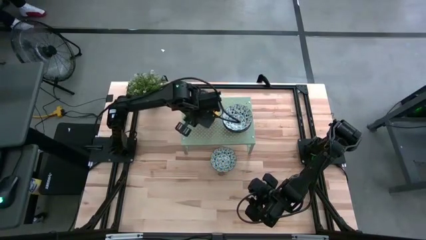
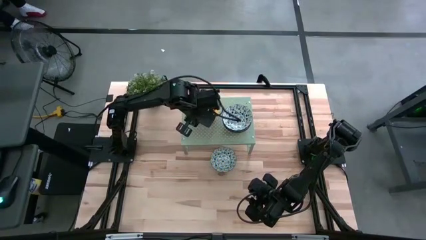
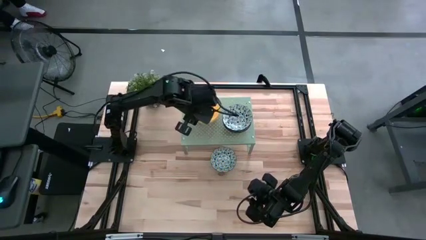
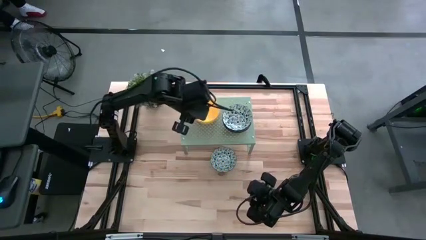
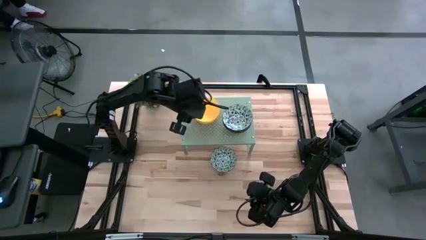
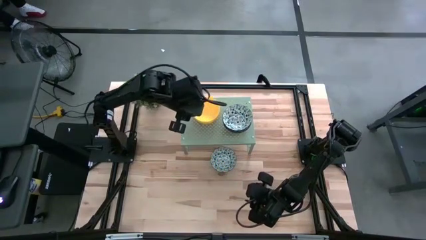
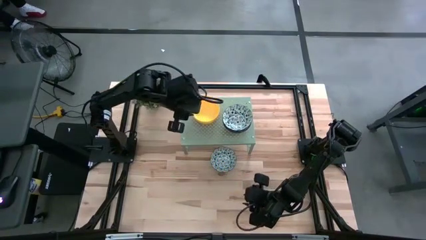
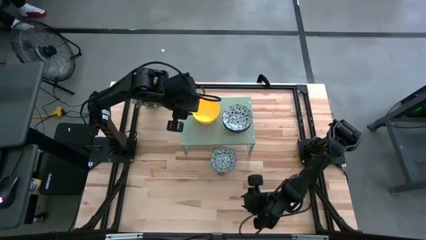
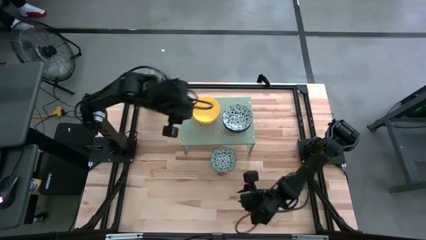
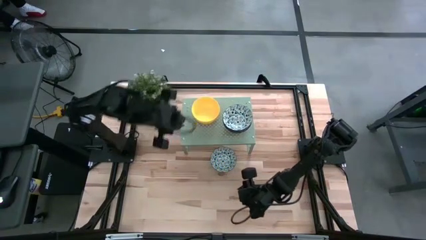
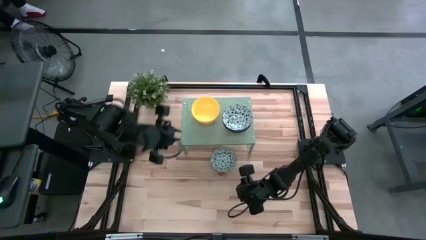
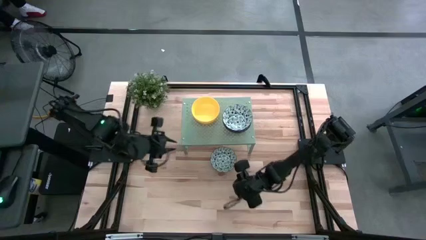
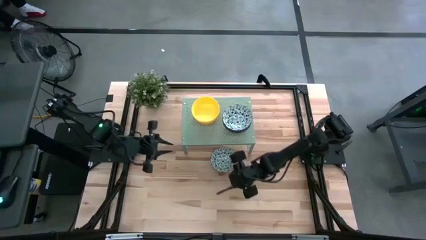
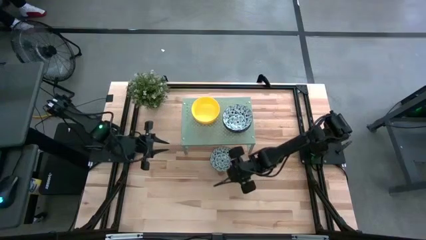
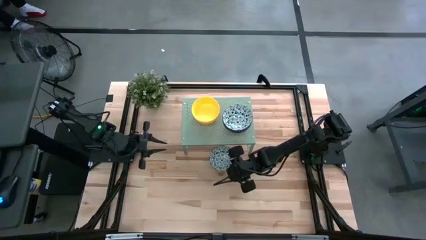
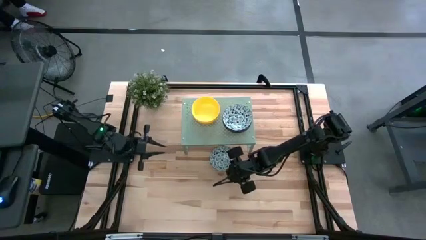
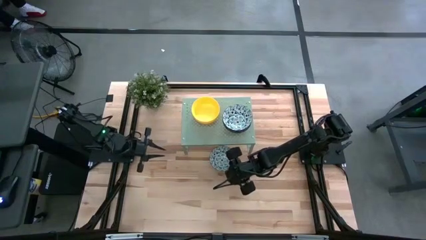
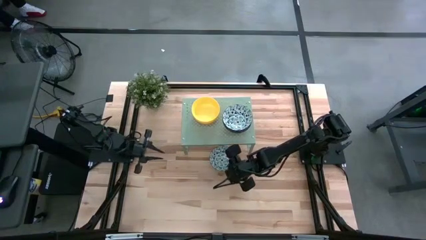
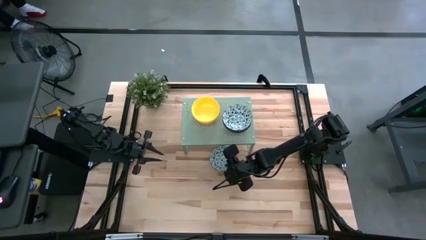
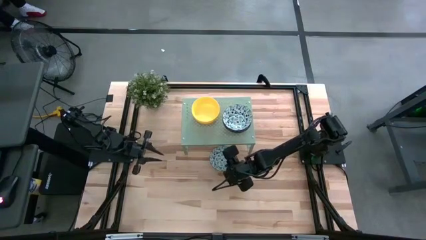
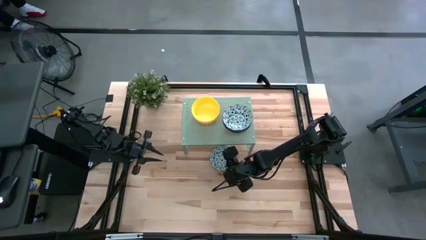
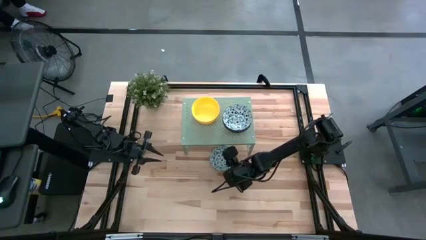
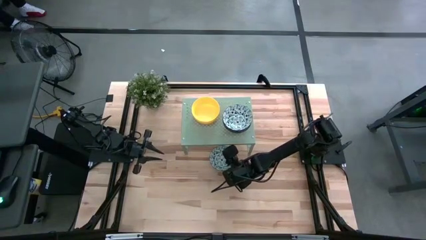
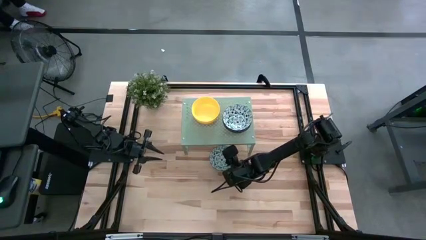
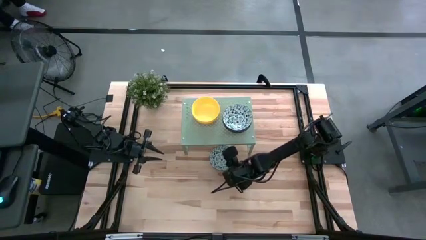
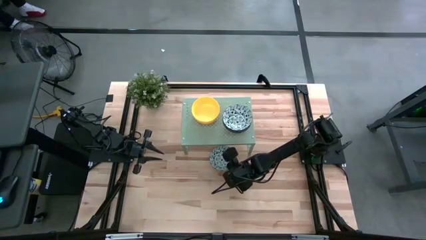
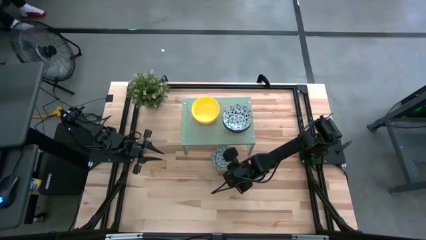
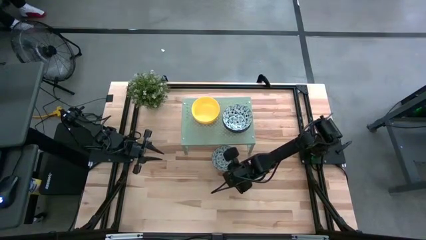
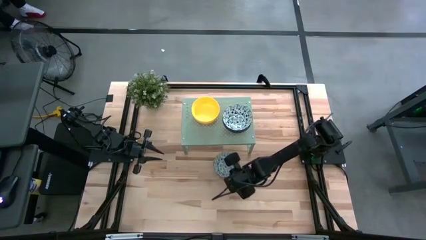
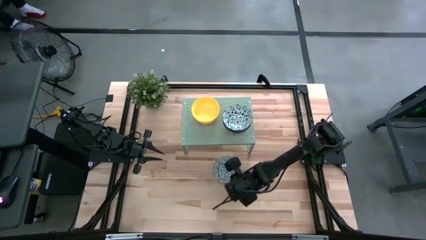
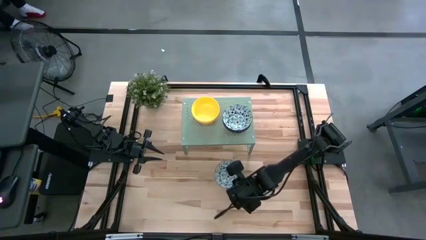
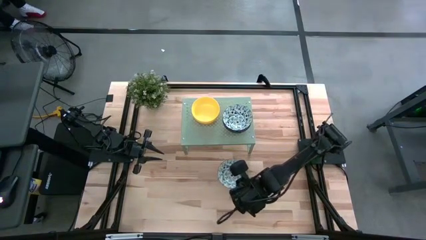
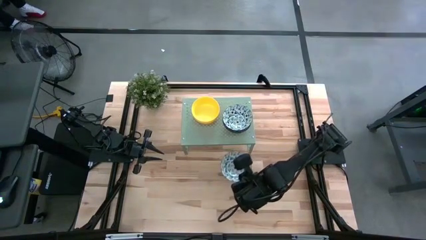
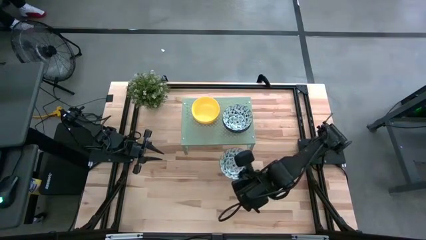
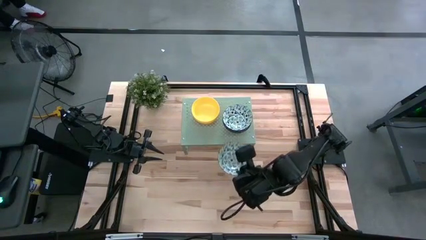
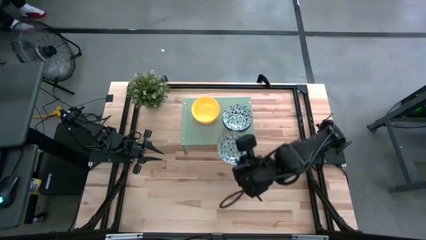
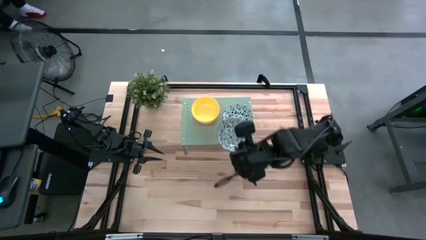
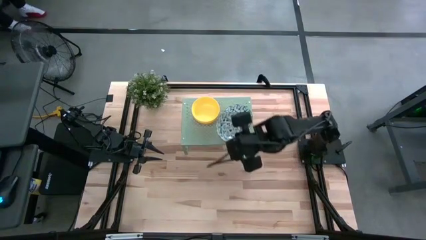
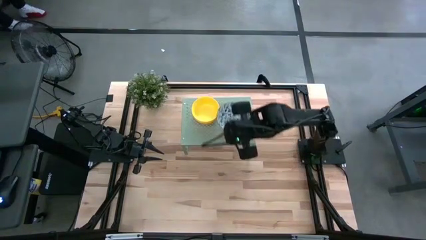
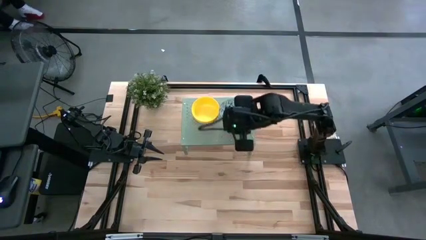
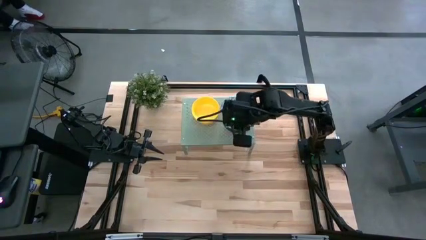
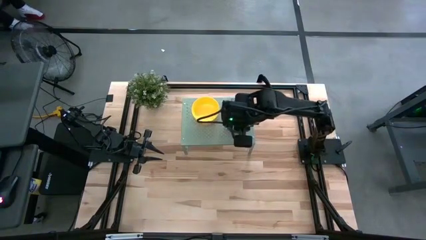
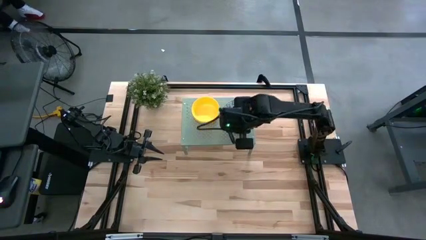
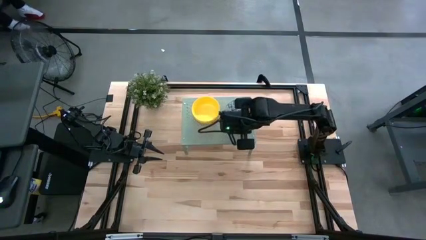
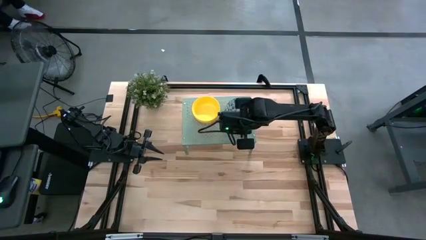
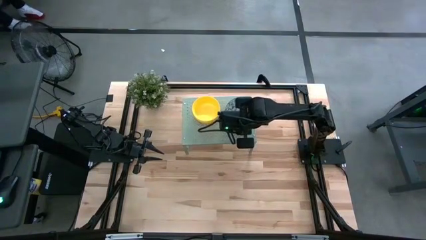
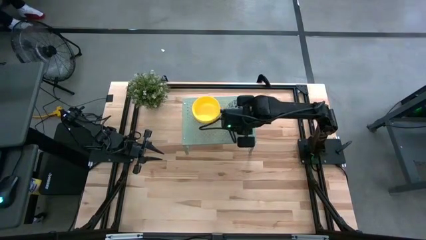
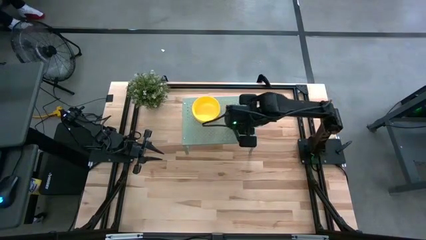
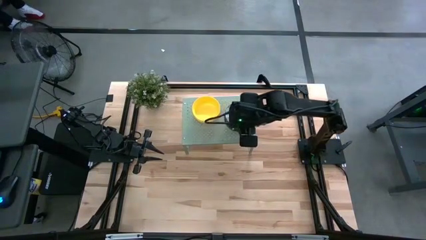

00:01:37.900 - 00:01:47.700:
Task: Pick & Place Mini bowls
Stack the green patterned bowl on top of the green patterned bowl on the shelf

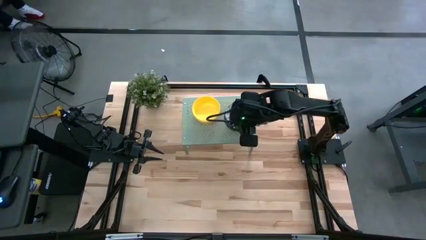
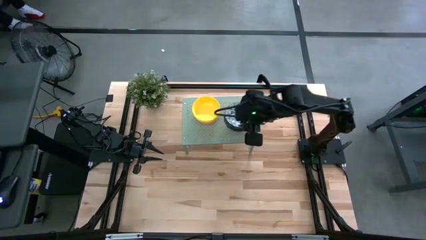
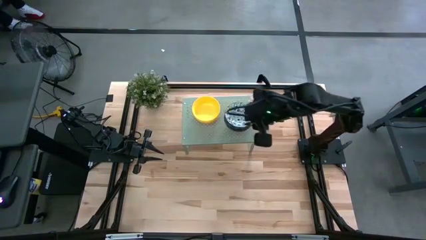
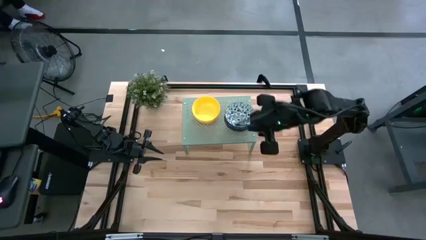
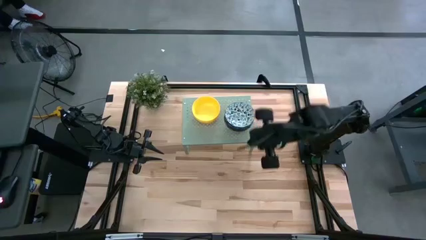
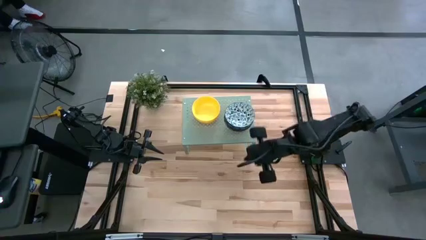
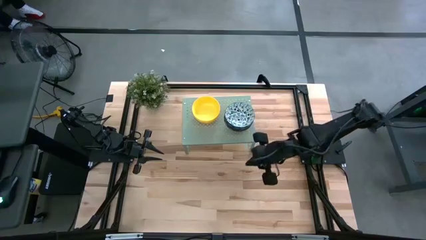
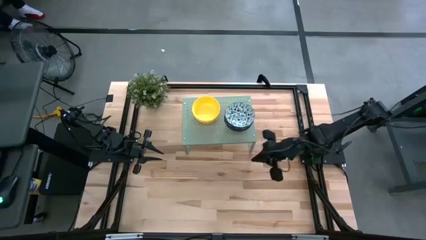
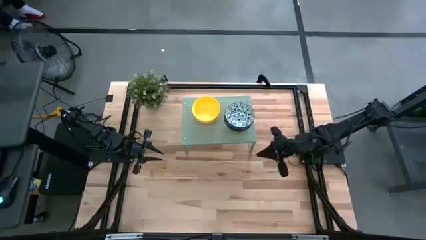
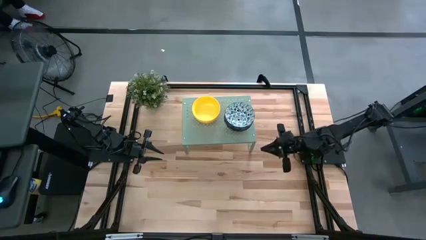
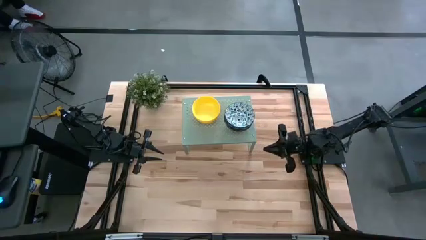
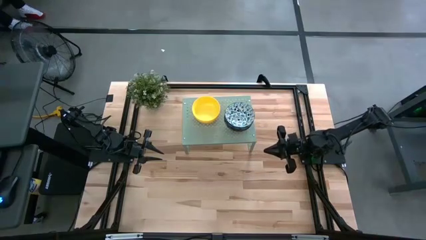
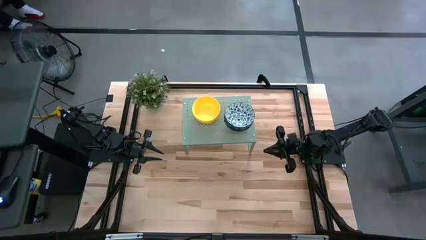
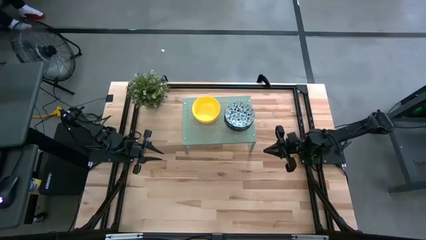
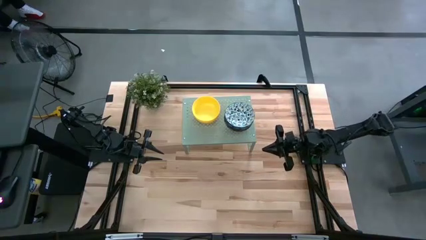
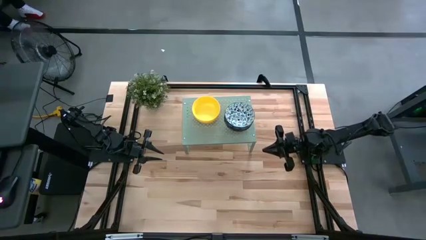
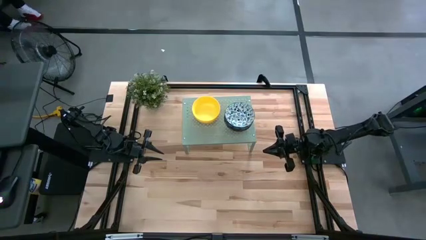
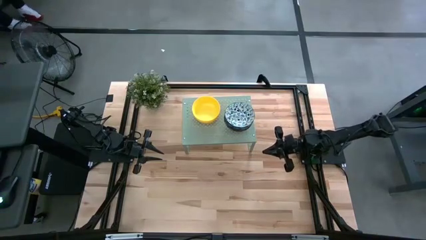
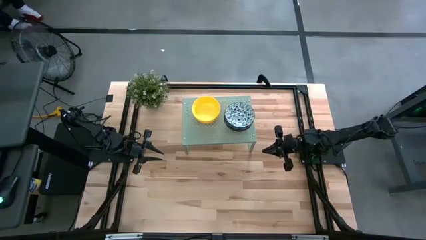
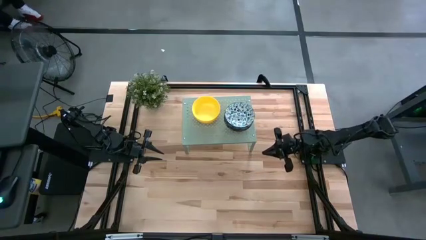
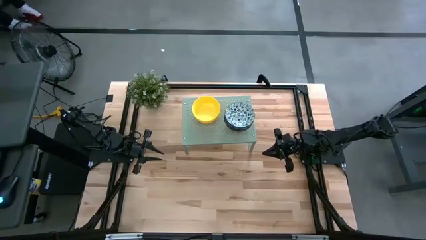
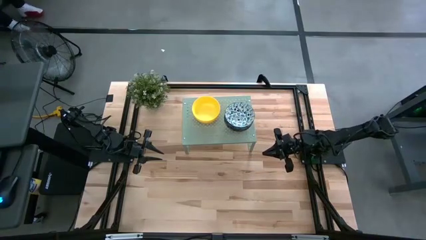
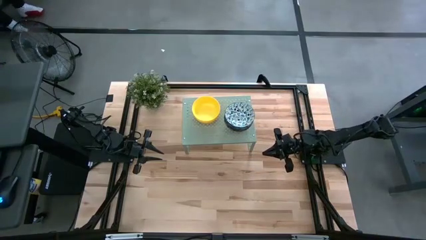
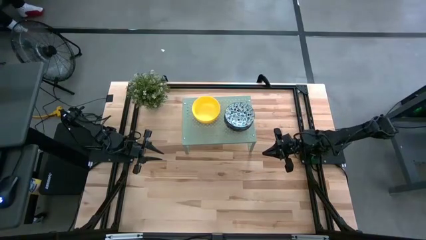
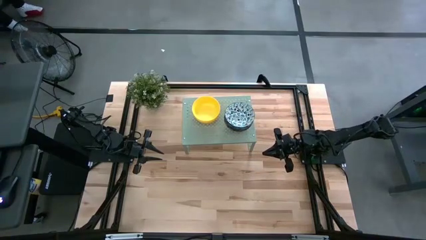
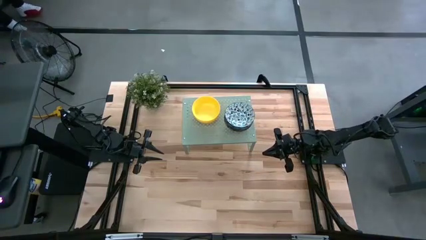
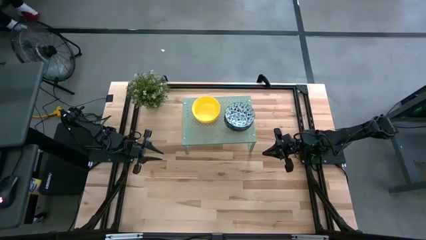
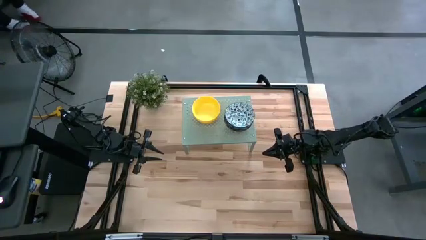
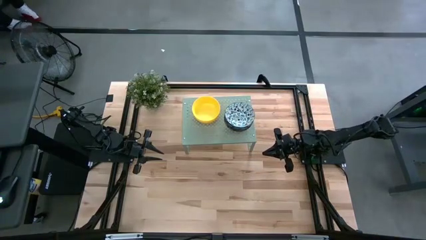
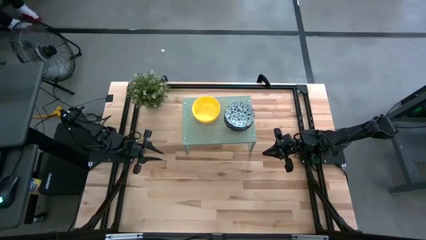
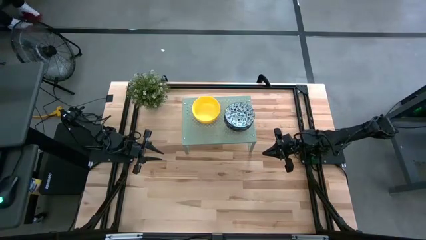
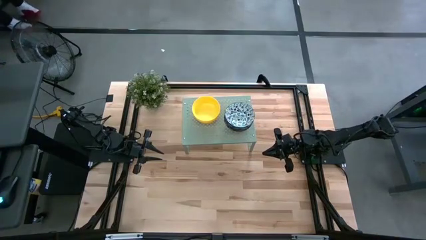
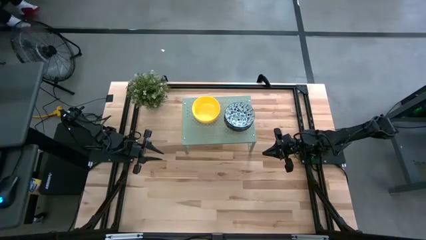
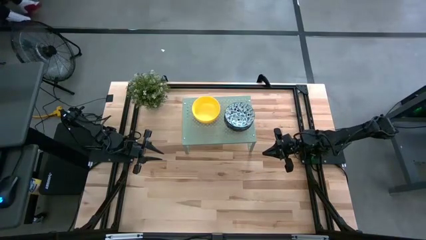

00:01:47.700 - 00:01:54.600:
Return to Home Position
